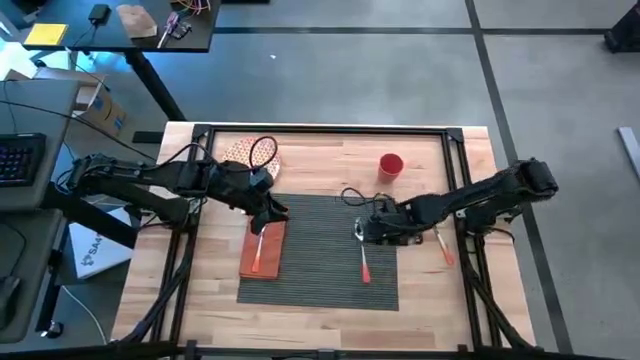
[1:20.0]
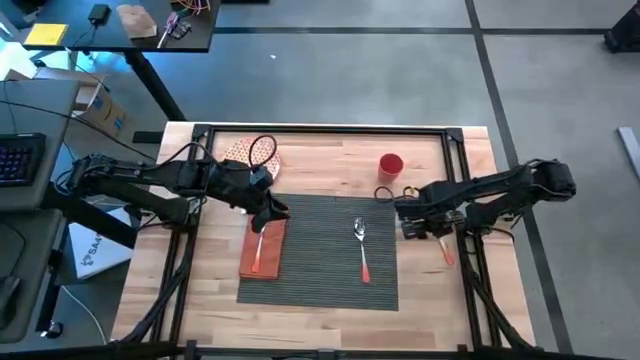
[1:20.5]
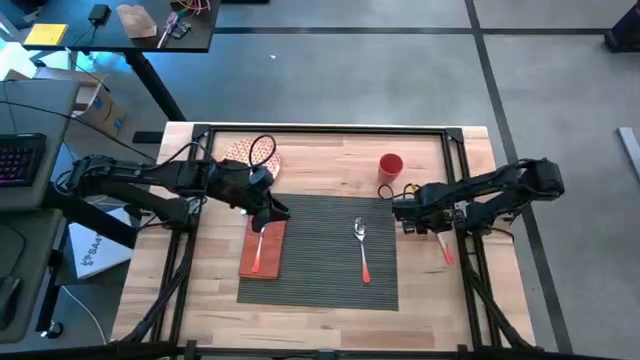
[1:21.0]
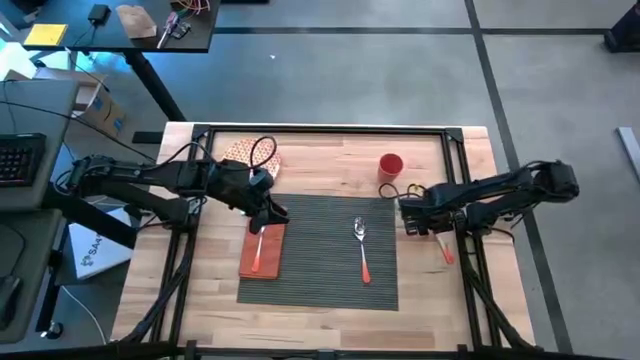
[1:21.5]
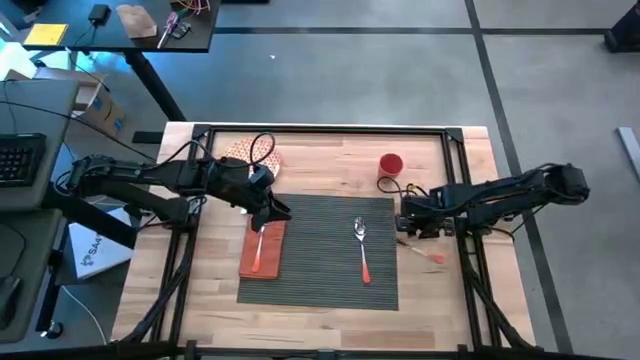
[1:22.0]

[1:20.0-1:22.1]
Task: Set table place
Put the knife on the gray placemat to the right of the spoon

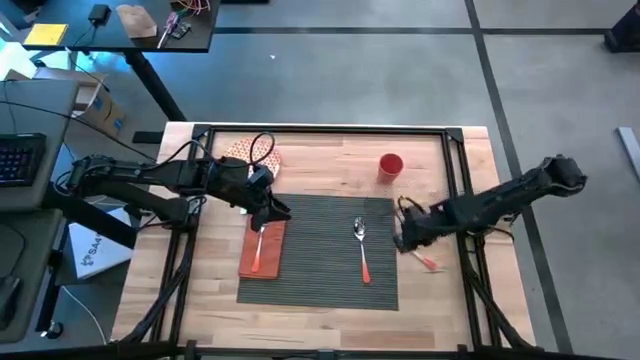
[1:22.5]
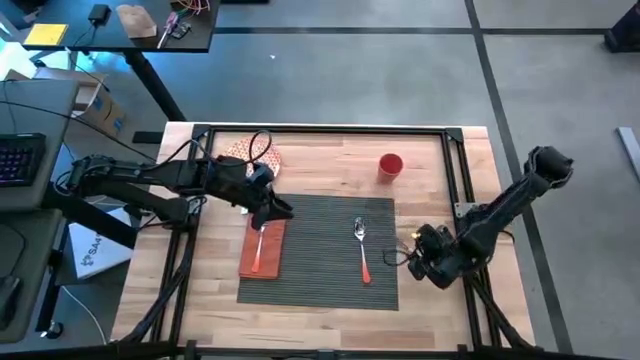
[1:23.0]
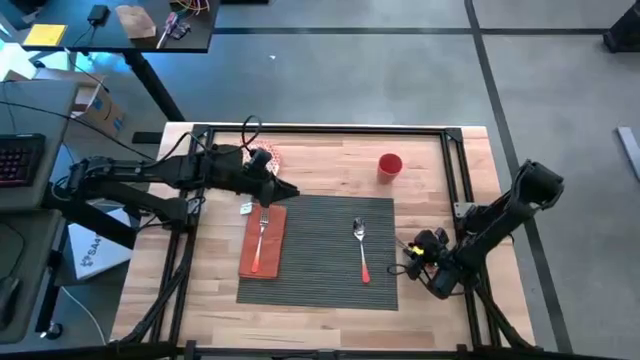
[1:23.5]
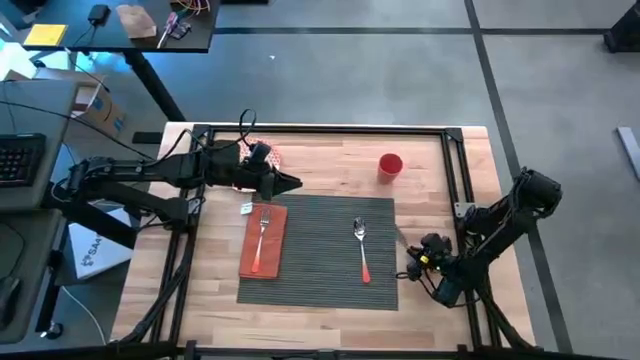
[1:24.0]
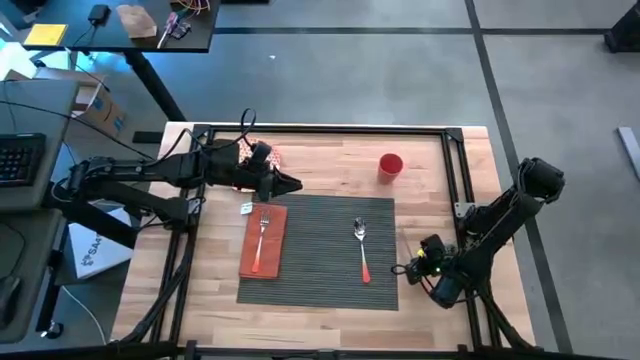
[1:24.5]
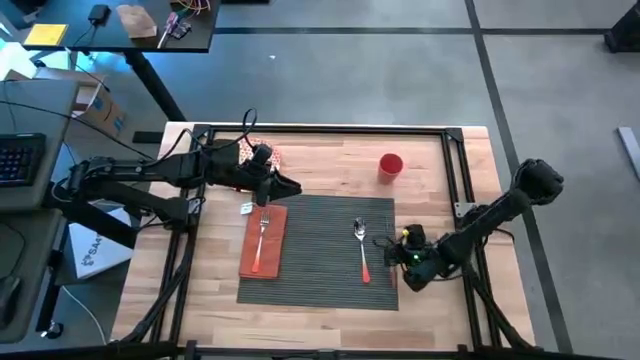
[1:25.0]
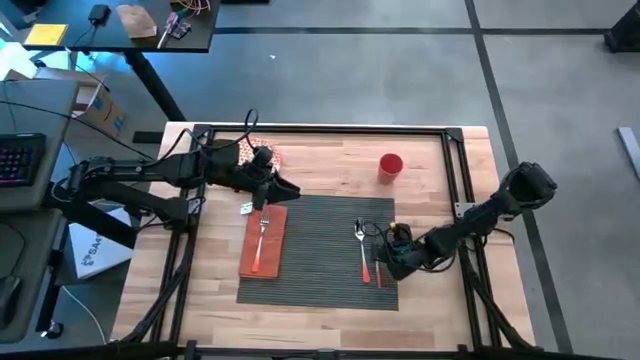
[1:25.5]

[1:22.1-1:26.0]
Put the knife on the gray placemat to the right of the spoon

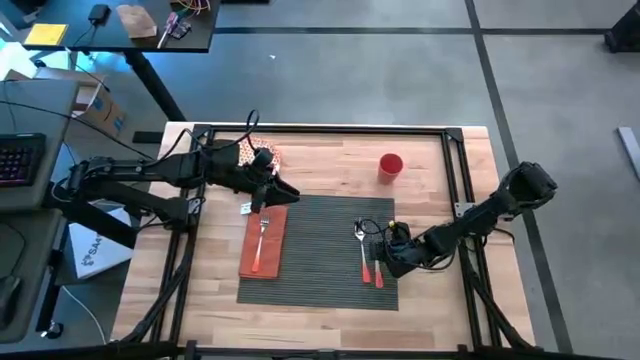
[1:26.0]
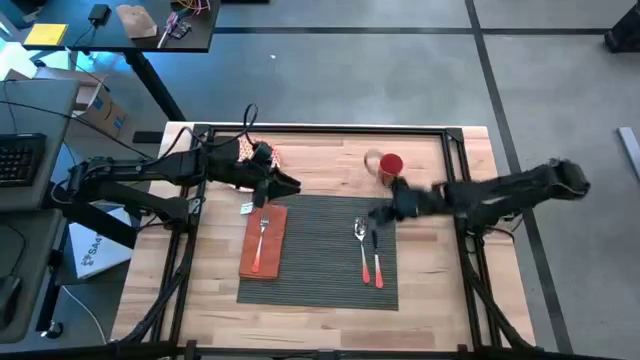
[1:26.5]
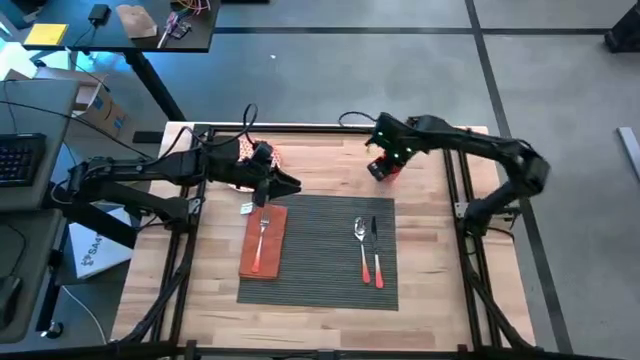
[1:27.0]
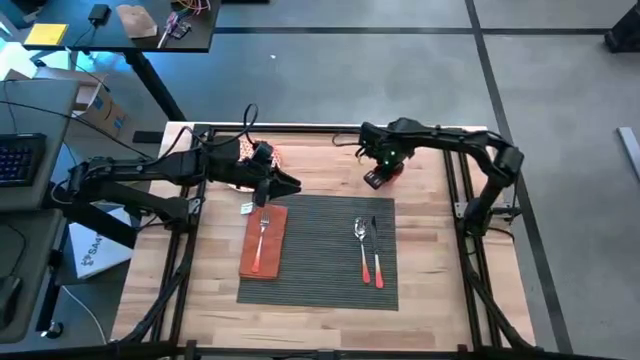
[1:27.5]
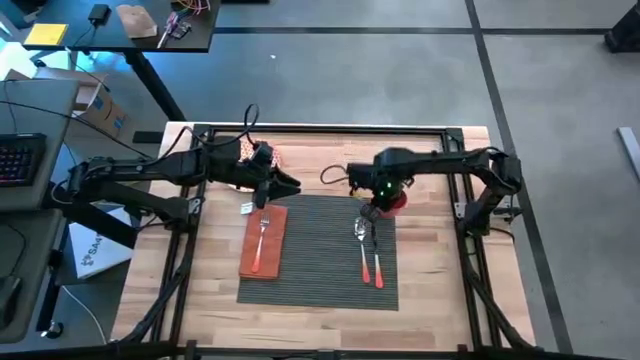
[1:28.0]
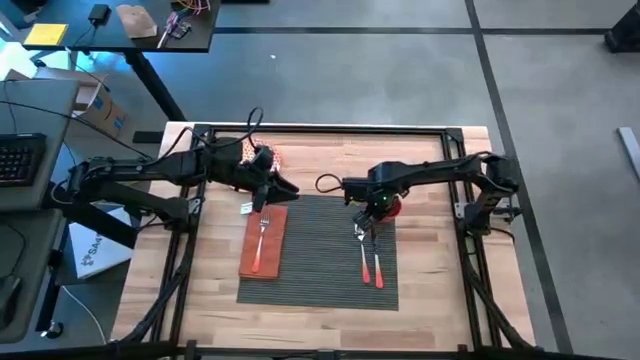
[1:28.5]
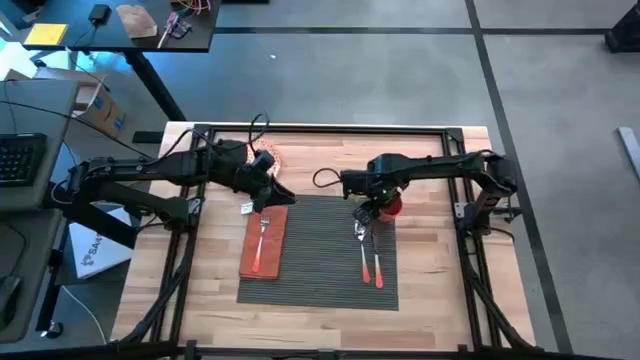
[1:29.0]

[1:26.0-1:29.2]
Put the cup on the gray placemat to the upper right of the knife

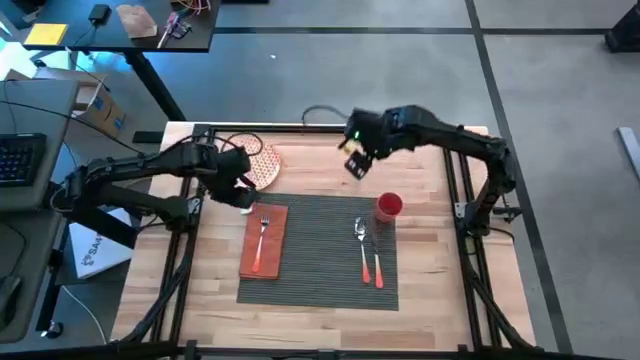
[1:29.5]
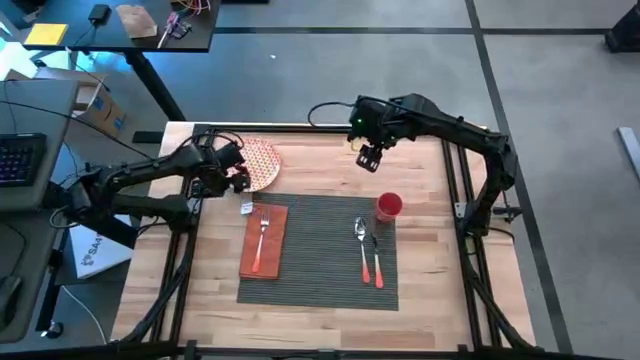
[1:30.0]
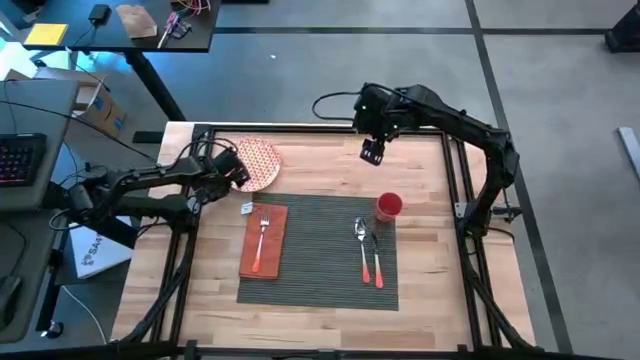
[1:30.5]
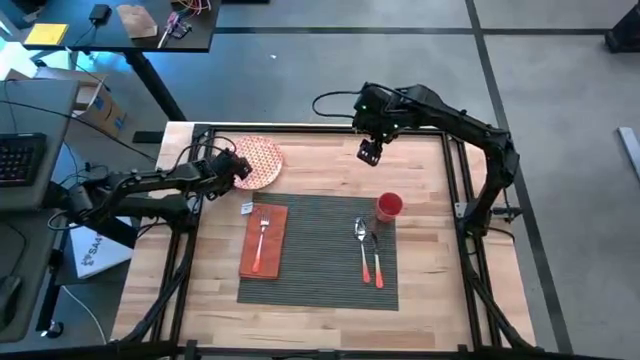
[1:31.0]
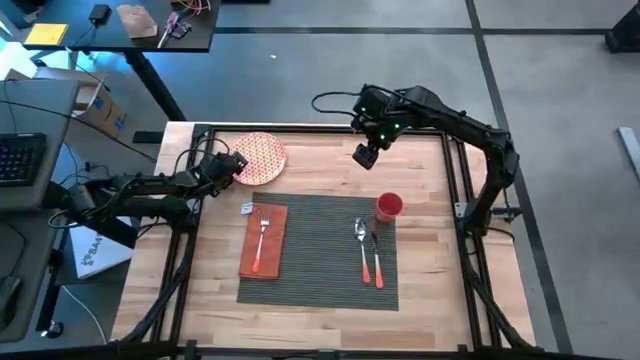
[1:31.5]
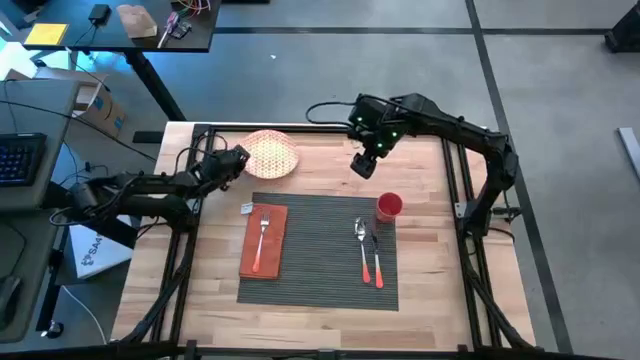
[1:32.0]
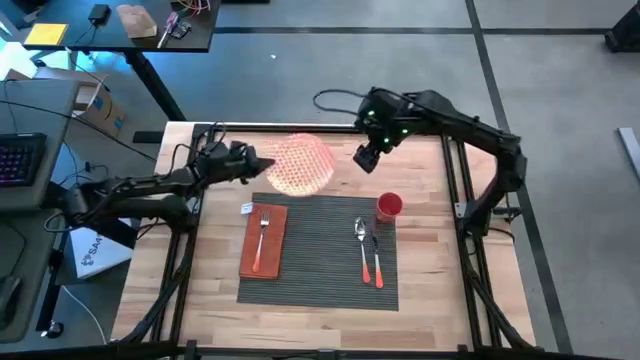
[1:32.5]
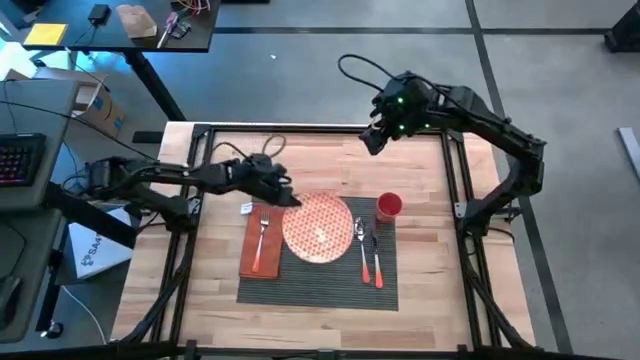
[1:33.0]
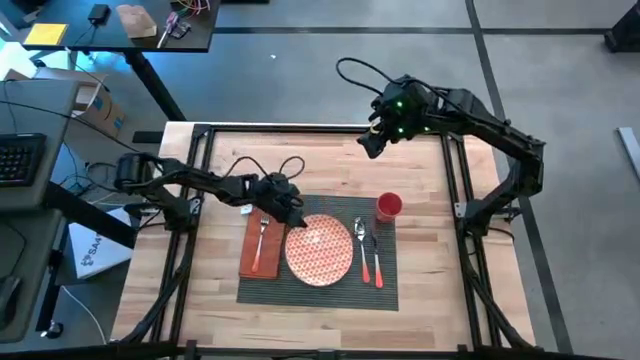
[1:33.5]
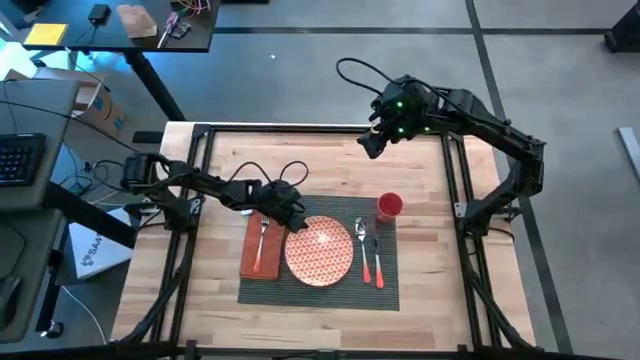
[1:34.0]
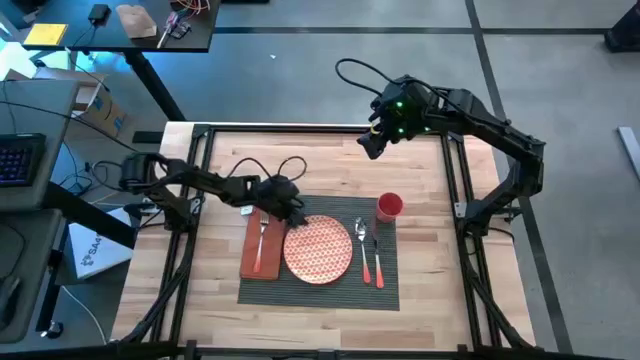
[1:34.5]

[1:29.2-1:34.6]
Put the orange plate in the center of the gray placemat

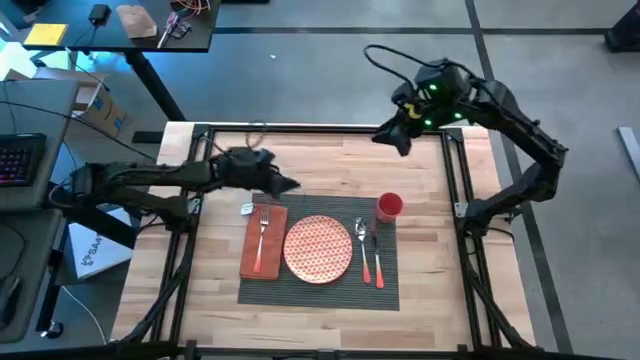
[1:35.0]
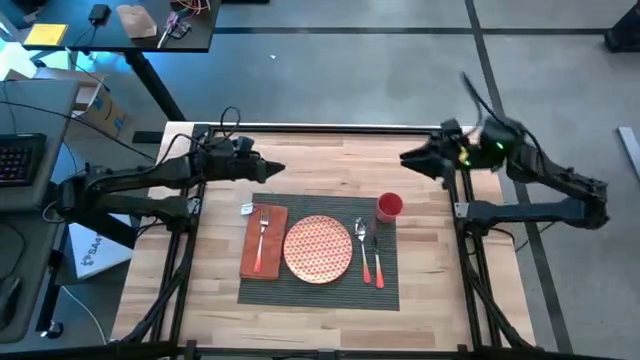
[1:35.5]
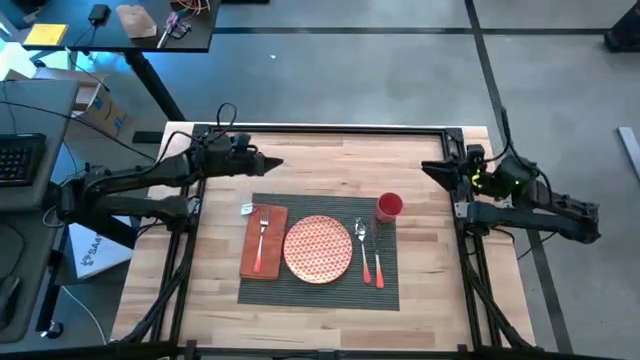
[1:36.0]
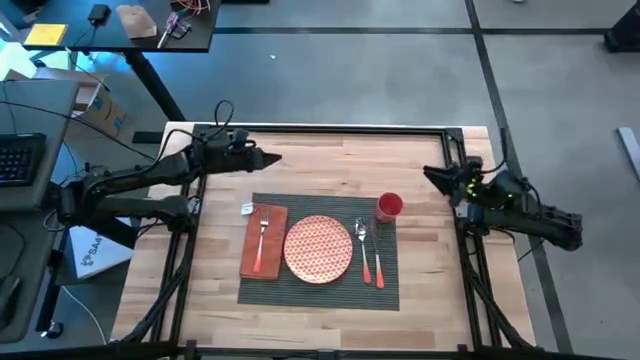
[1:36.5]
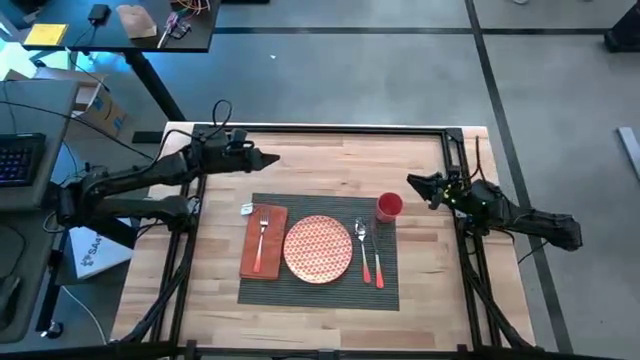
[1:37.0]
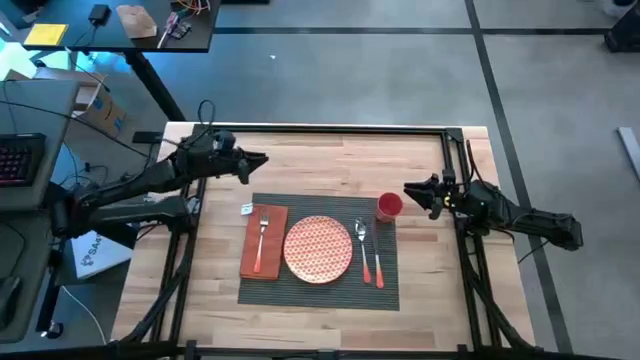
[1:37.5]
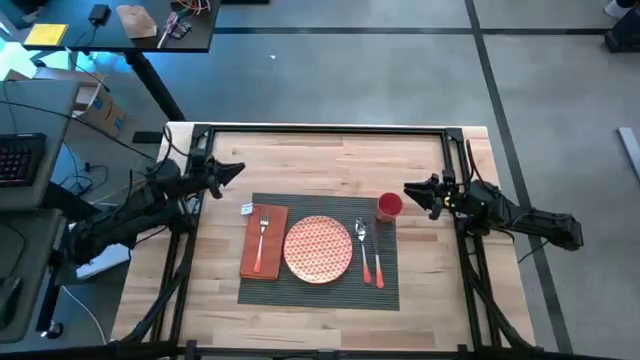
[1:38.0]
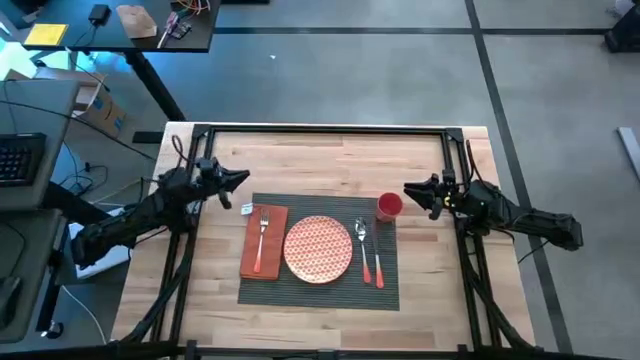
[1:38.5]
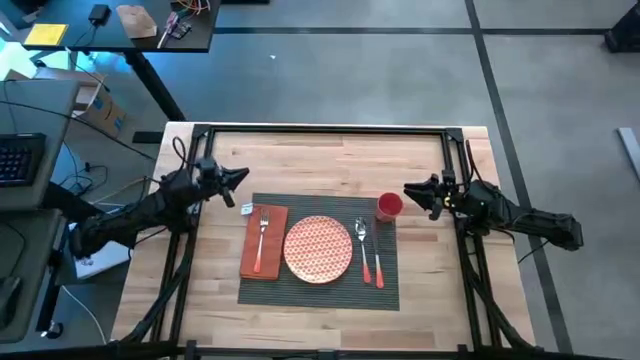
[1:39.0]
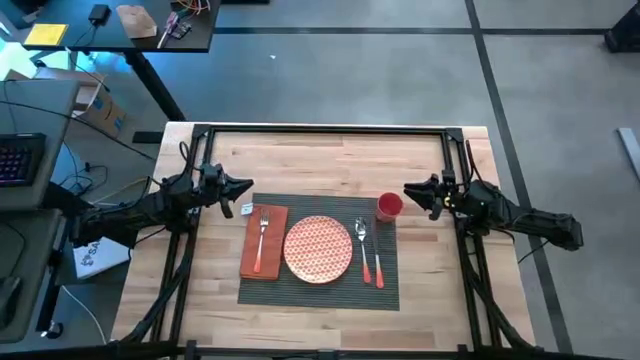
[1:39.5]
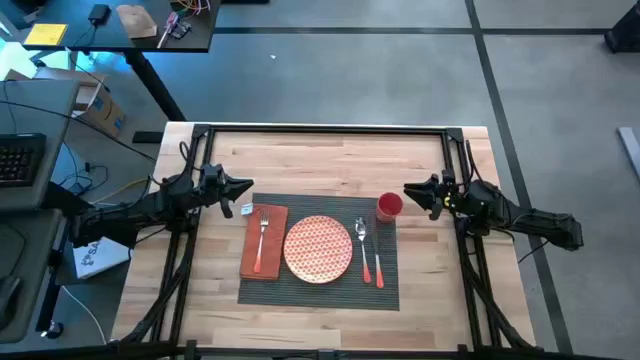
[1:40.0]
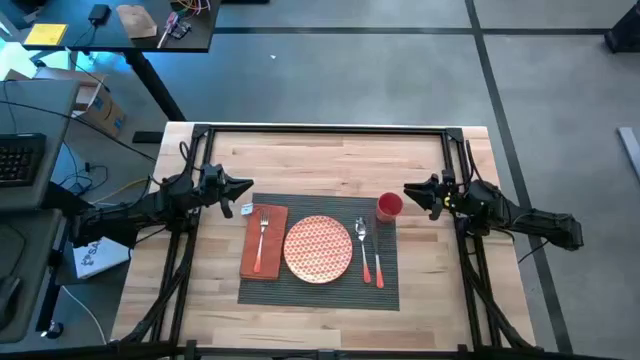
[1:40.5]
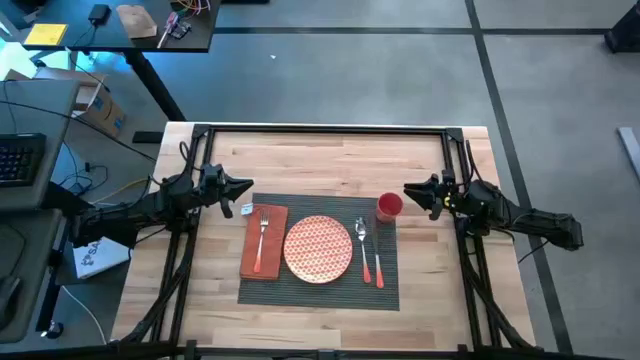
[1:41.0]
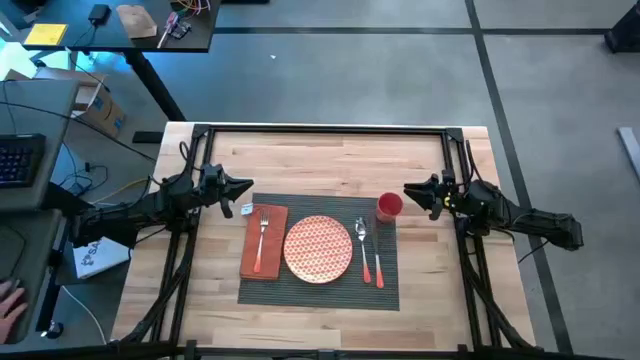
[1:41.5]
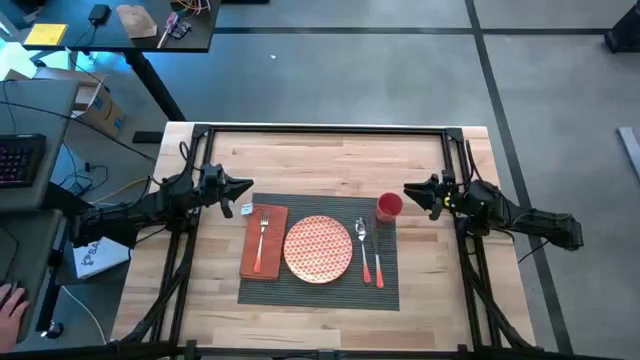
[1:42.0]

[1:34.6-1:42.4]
Return to Home Position
